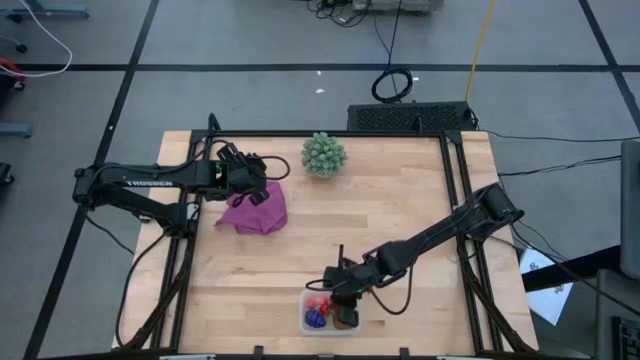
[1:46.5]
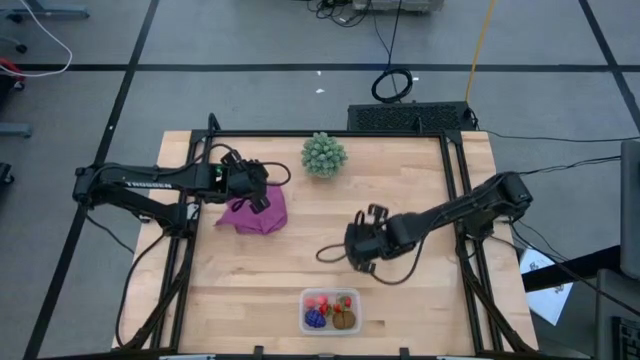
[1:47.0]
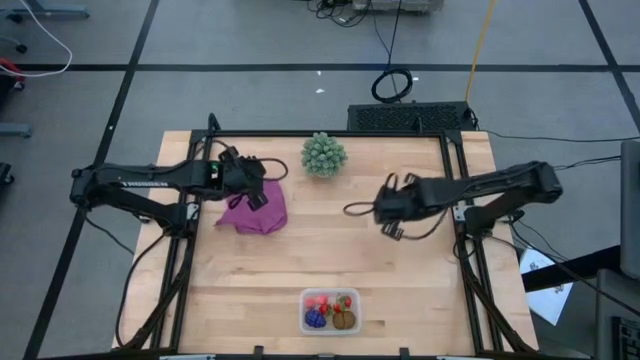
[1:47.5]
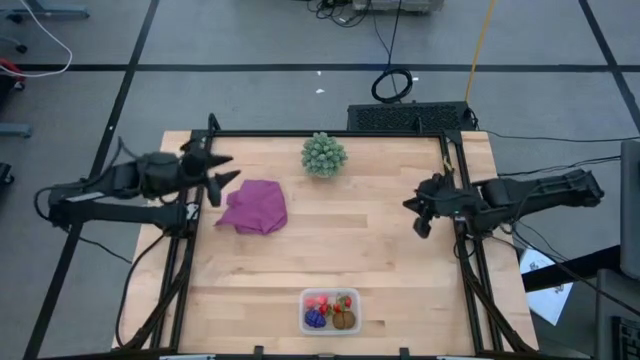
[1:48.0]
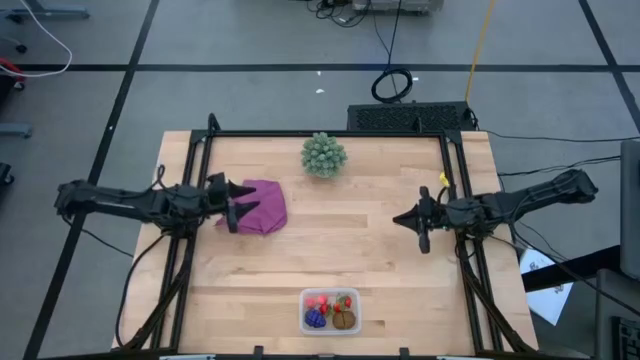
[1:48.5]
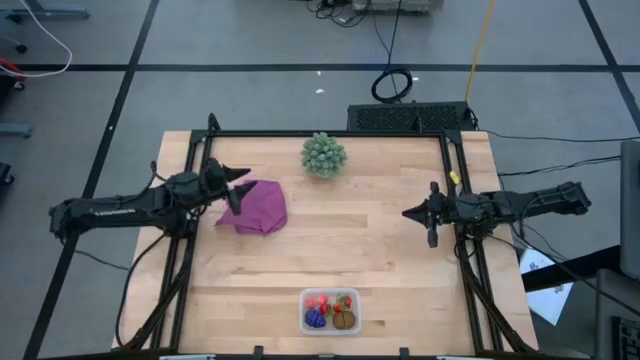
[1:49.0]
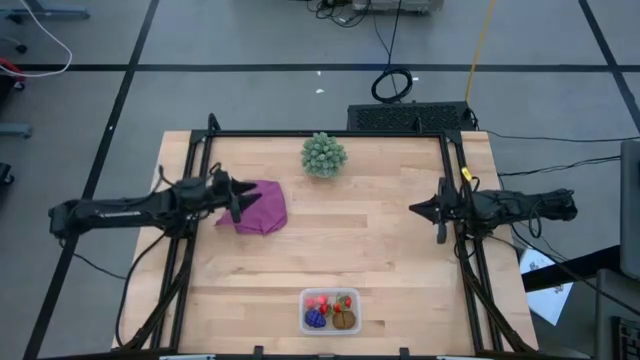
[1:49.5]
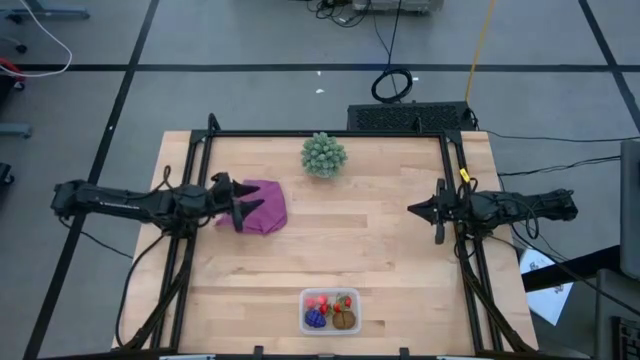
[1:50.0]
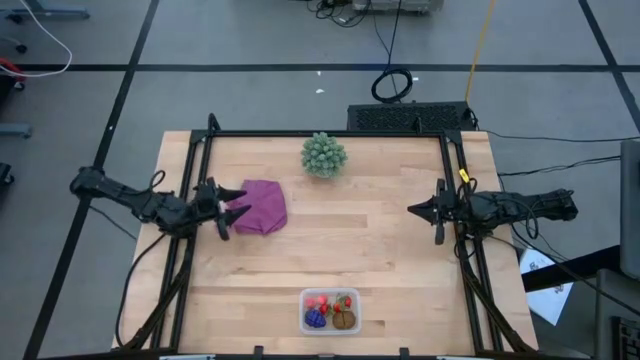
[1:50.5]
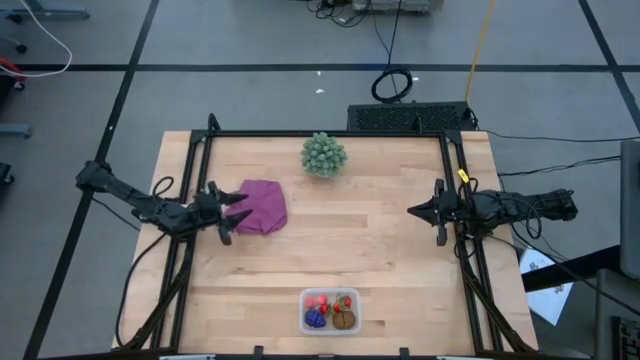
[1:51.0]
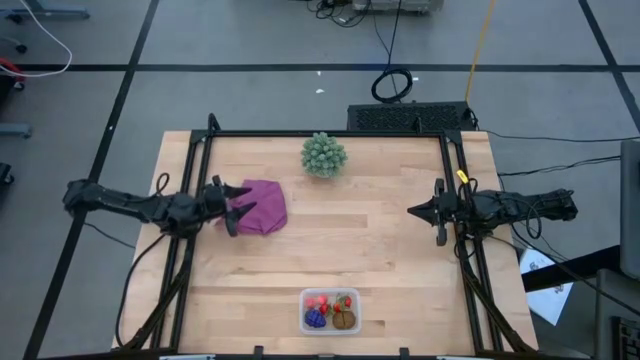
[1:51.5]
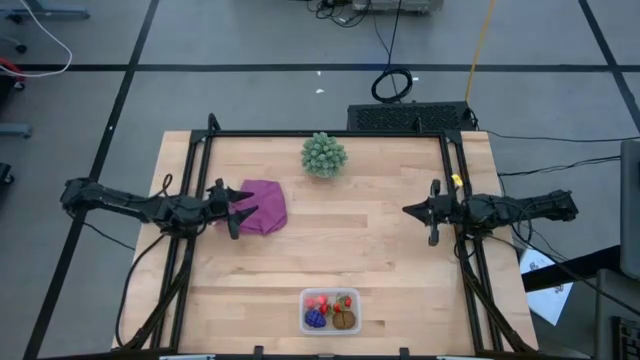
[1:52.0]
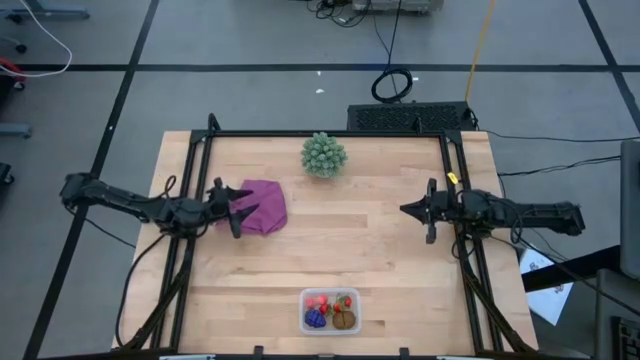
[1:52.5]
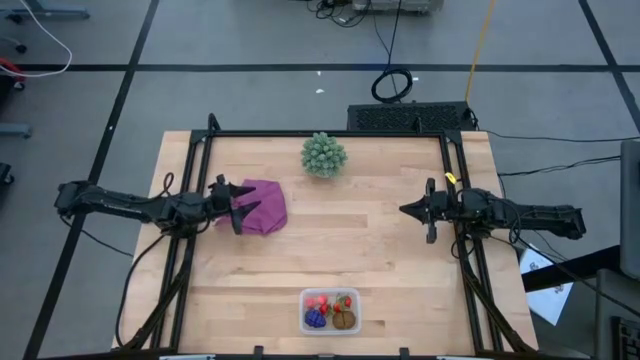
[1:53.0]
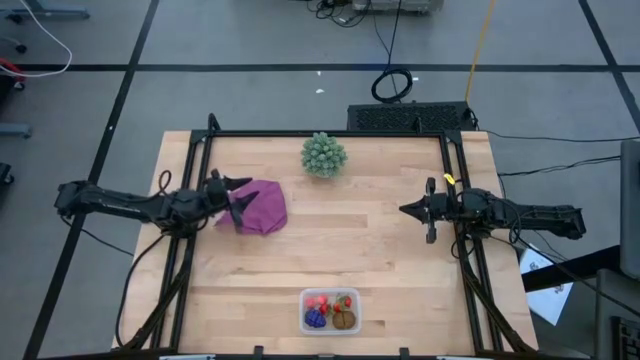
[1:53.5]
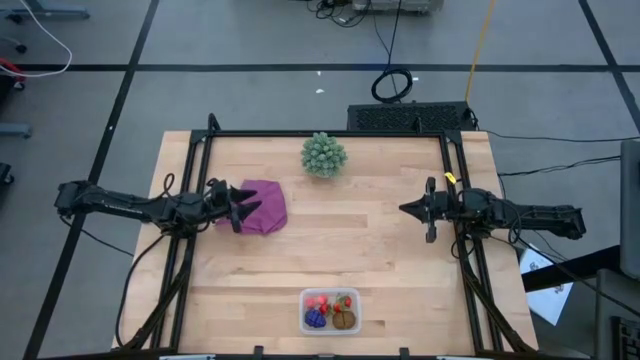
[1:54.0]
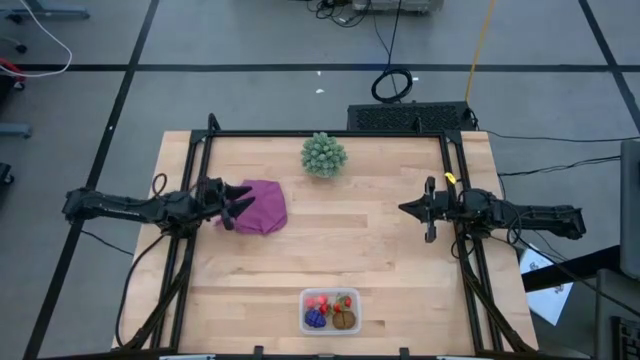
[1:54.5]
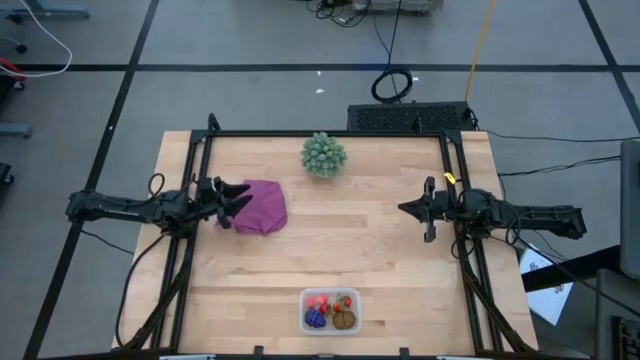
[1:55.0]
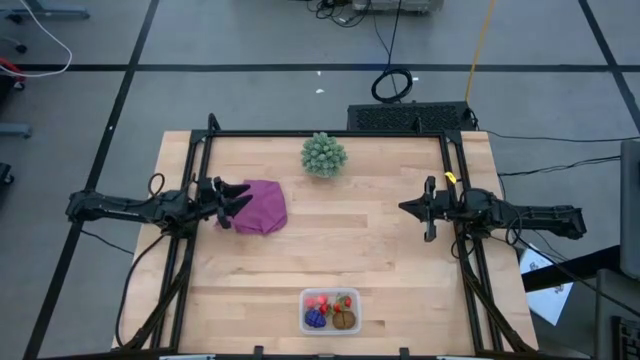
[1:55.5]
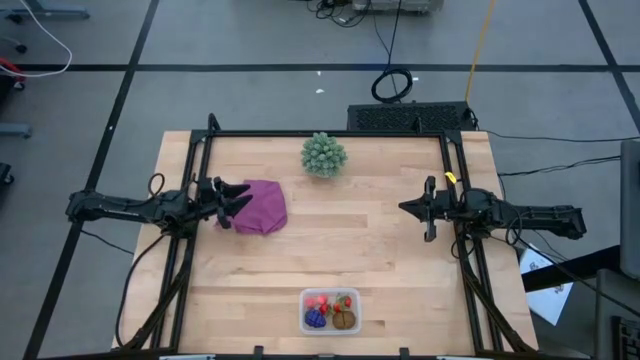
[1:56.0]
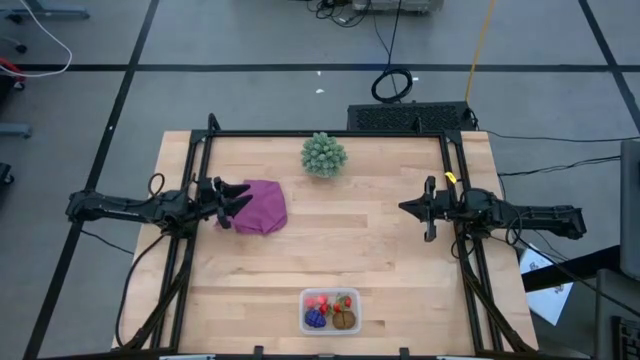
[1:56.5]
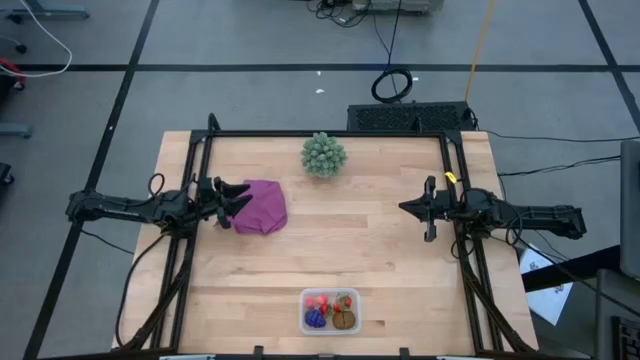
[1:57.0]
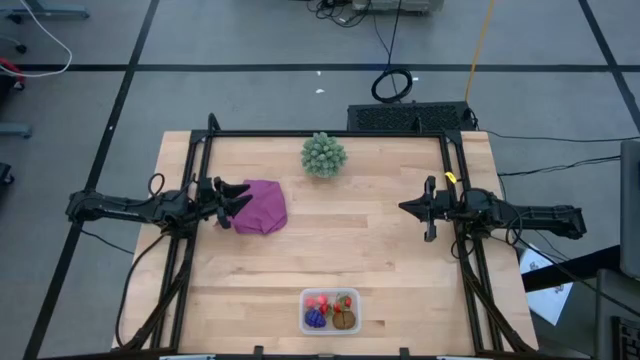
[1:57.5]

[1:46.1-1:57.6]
Task: Pick and placing Produce into tupperware
Return to Home Position

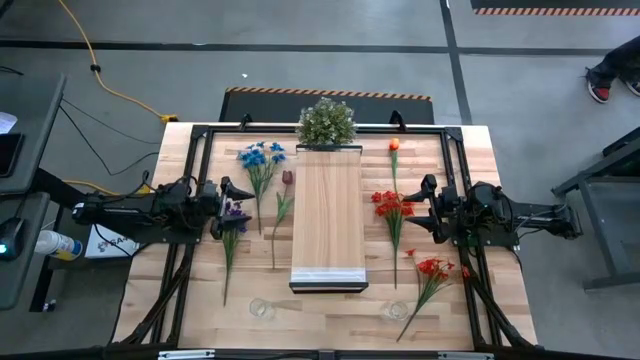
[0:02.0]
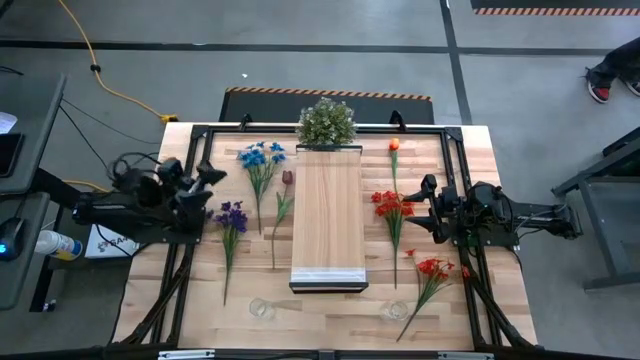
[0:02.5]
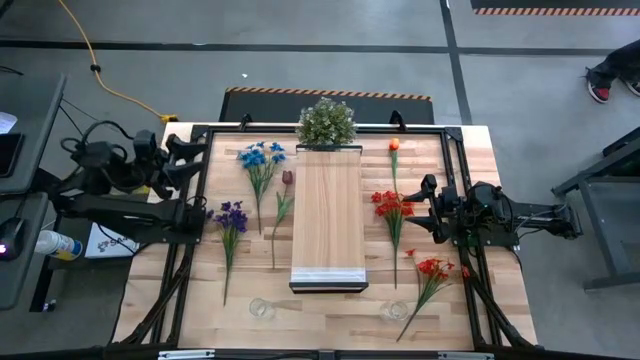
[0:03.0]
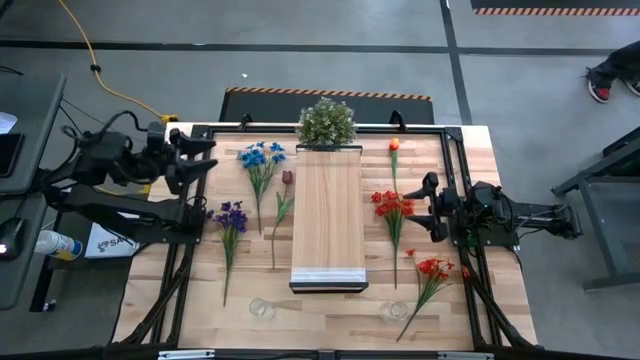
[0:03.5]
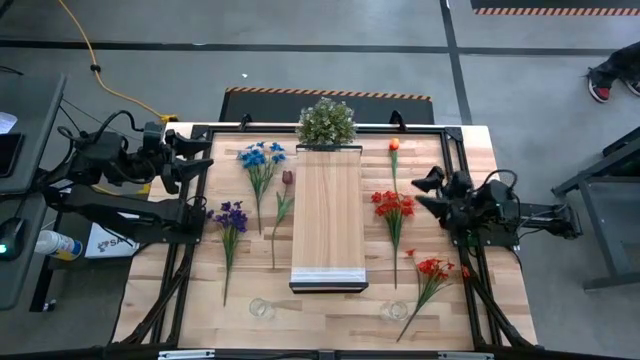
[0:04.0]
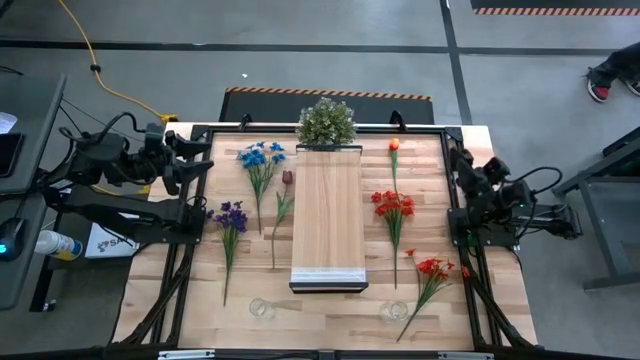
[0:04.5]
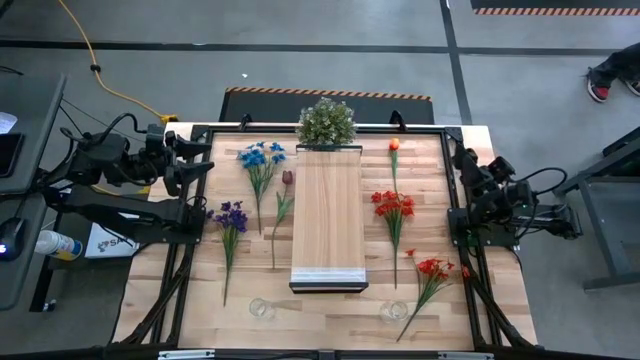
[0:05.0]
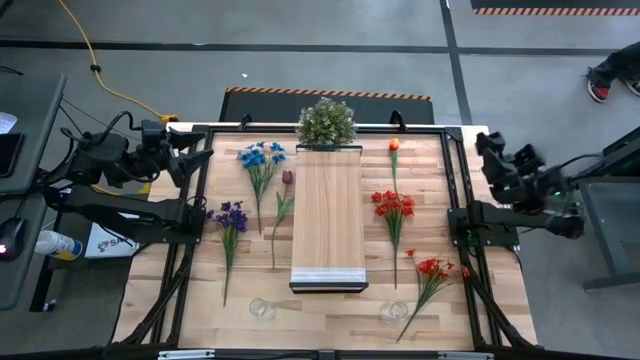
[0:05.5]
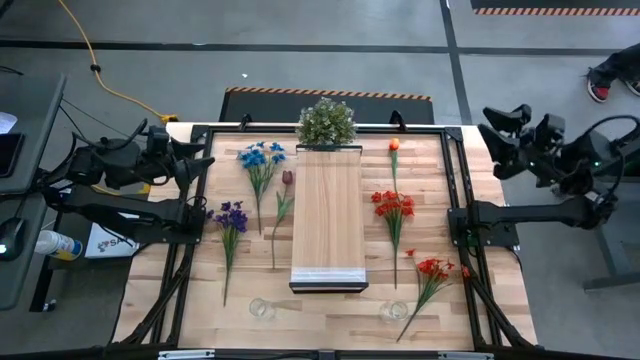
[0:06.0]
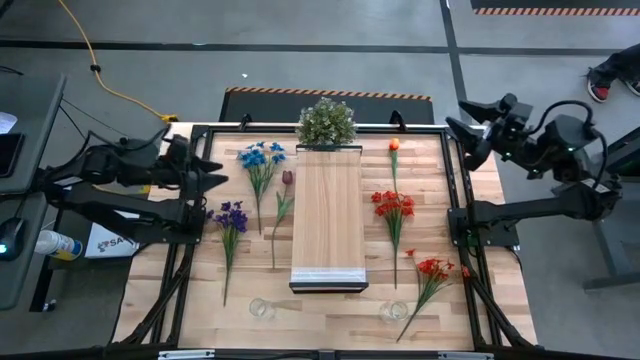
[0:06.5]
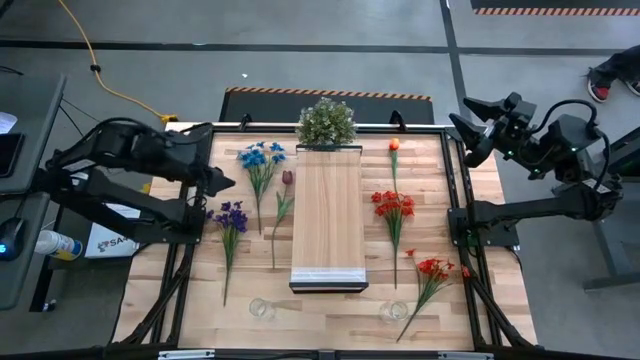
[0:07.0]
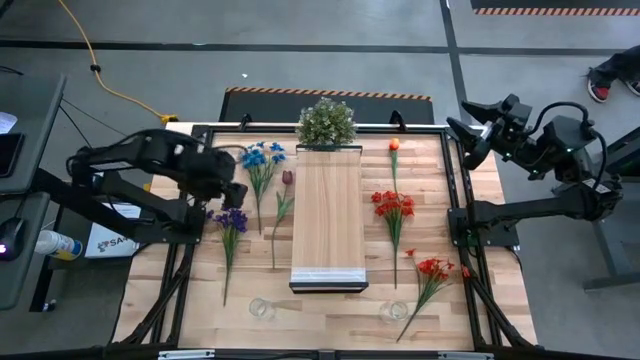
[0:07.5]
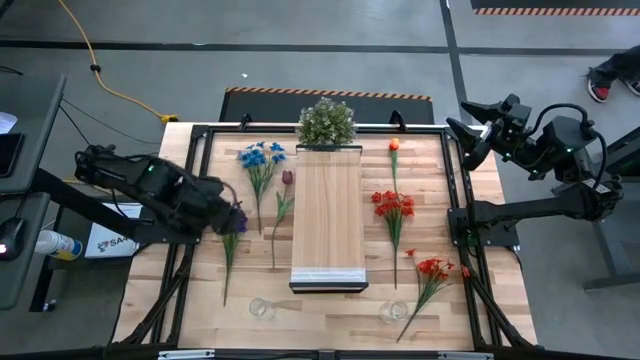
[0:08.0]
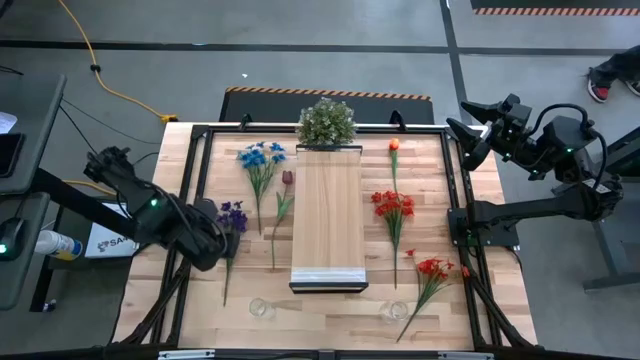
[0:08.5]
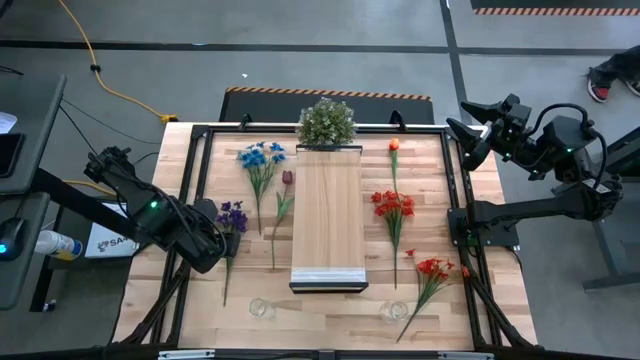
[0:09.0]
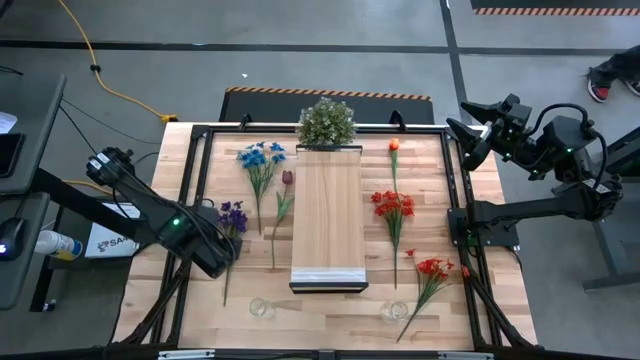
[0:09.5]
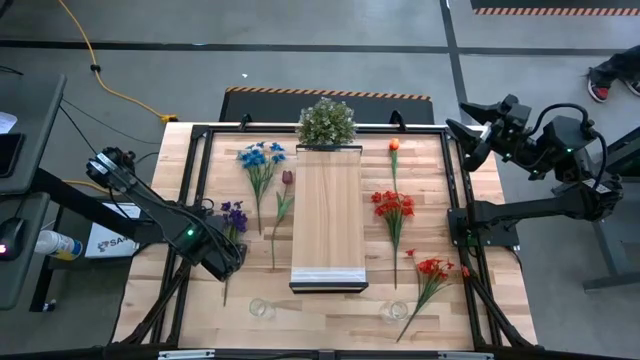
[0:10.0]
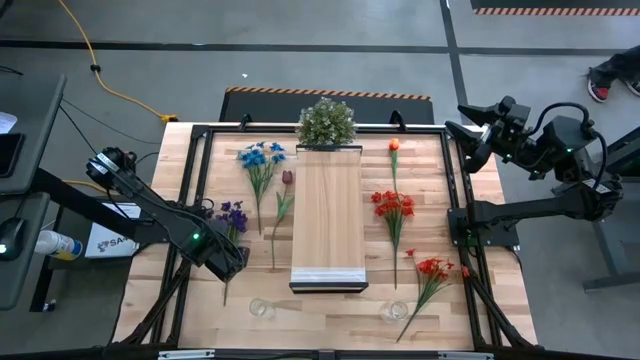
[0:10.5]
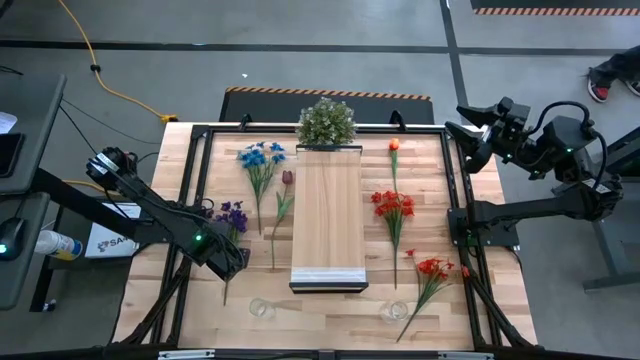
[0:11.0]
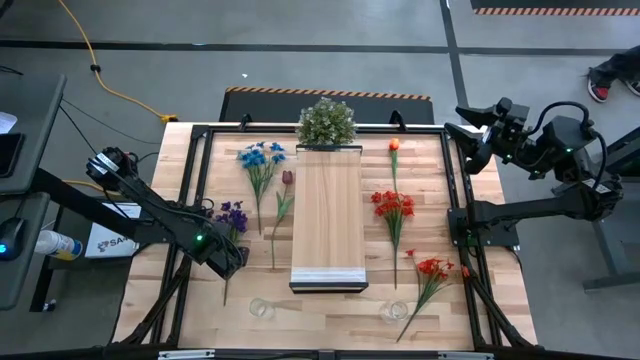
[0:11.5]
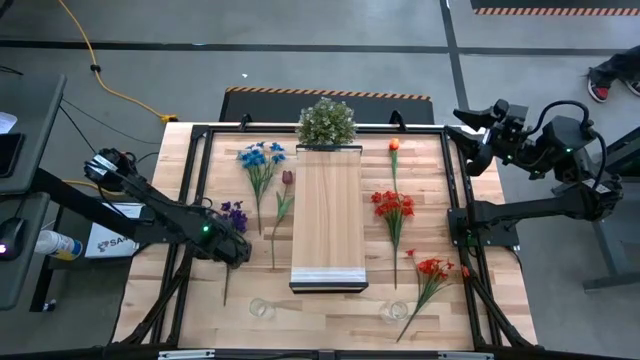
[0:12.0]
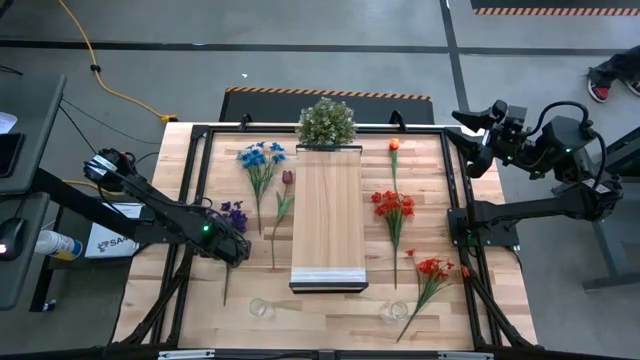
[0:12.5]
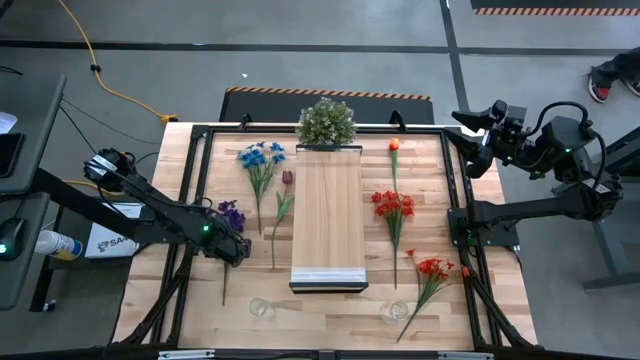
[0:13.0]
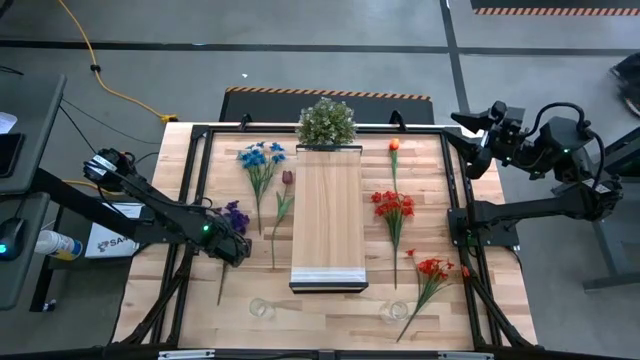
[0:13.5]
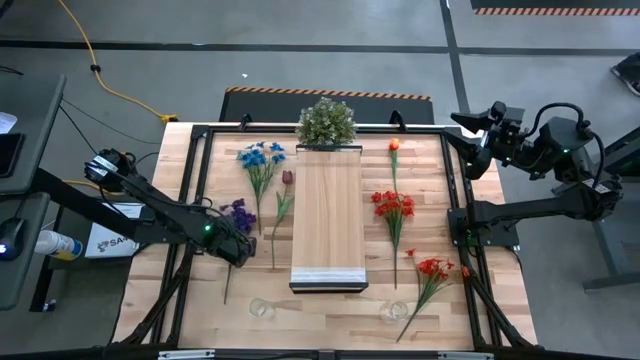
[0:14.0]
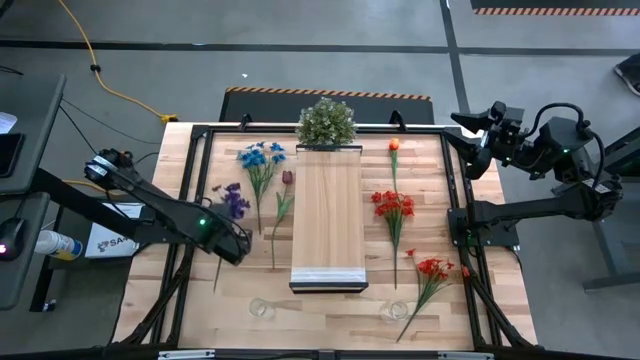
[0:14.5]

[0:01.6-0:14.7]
Task: Pick and place flowers into a vace then onto a shelf
Put the purple flowers into the left transparent vase
